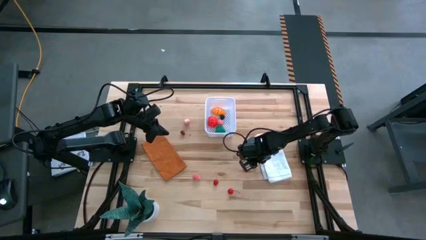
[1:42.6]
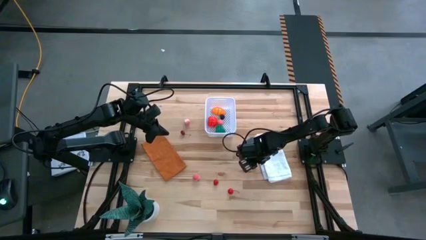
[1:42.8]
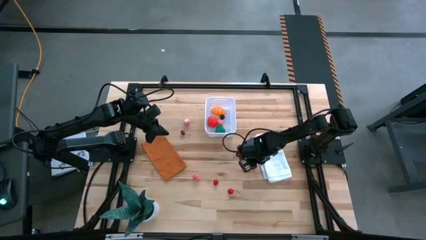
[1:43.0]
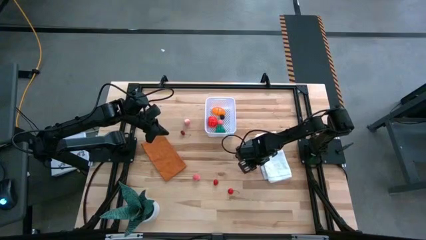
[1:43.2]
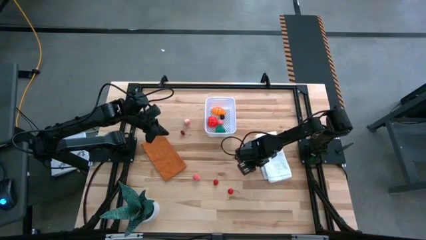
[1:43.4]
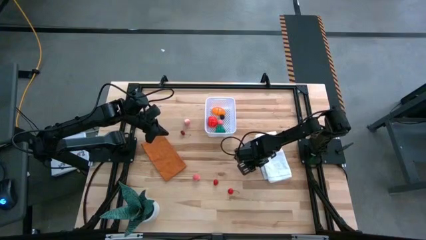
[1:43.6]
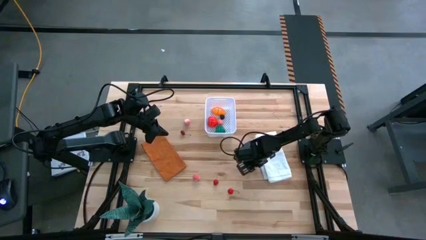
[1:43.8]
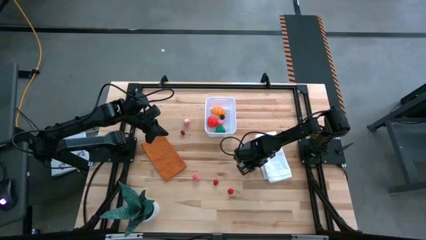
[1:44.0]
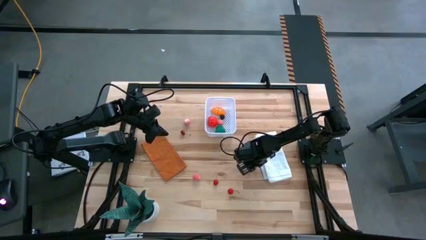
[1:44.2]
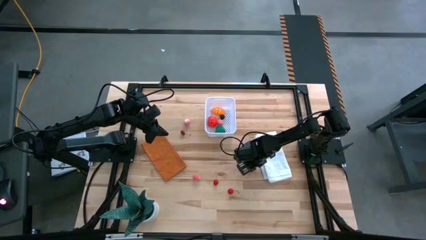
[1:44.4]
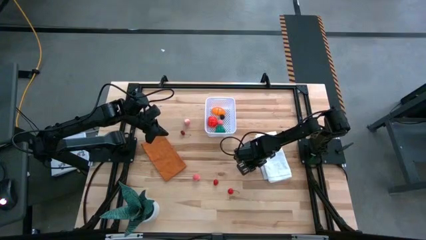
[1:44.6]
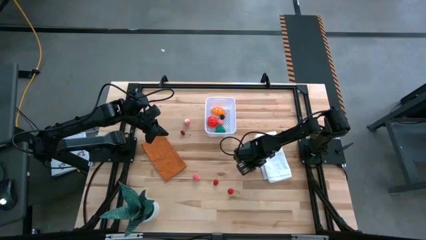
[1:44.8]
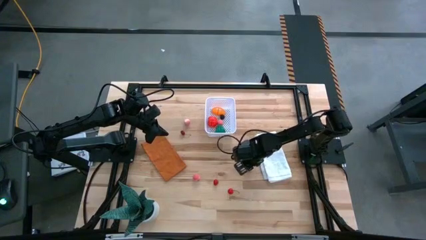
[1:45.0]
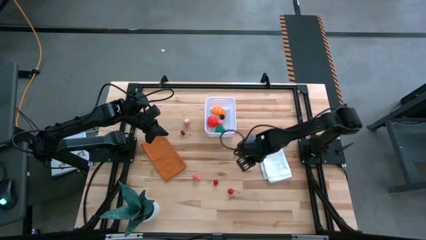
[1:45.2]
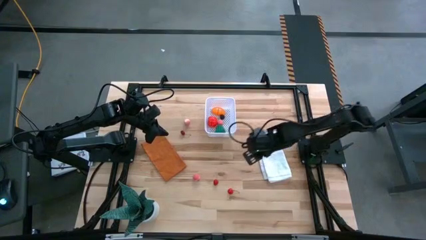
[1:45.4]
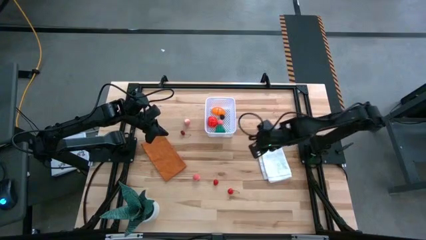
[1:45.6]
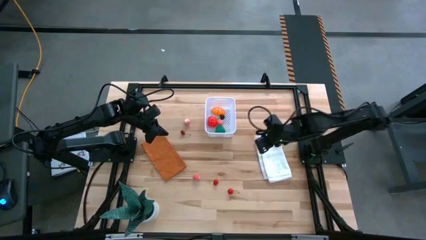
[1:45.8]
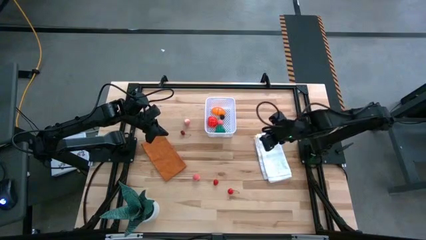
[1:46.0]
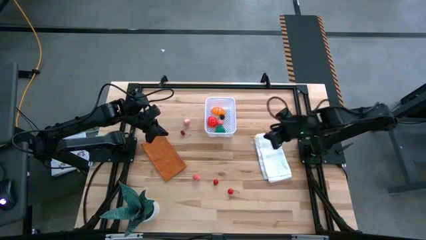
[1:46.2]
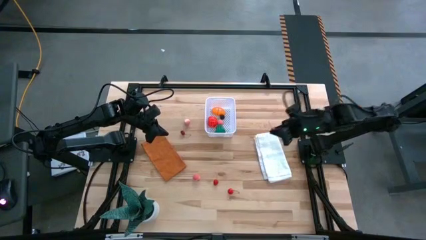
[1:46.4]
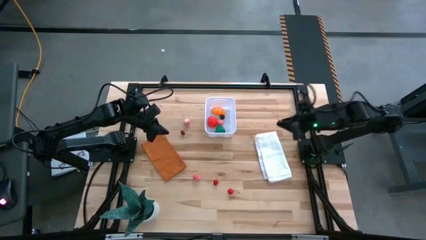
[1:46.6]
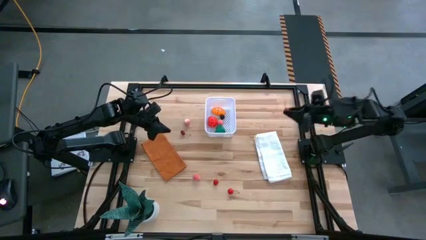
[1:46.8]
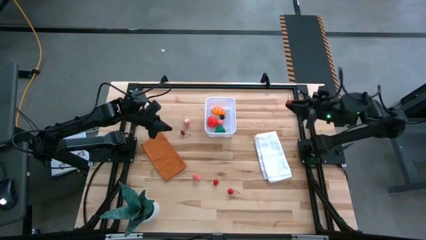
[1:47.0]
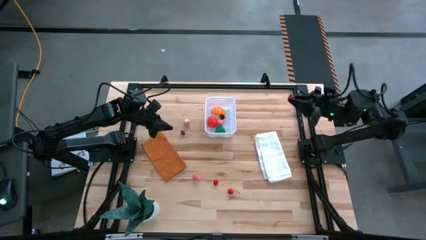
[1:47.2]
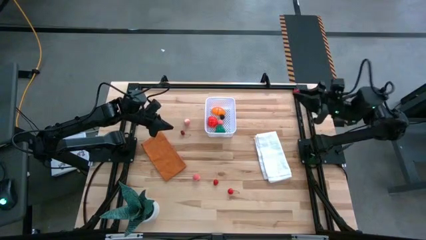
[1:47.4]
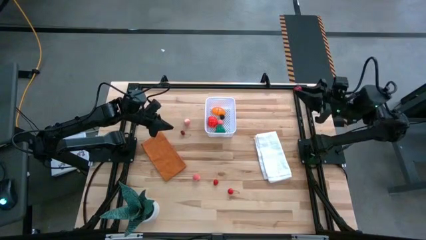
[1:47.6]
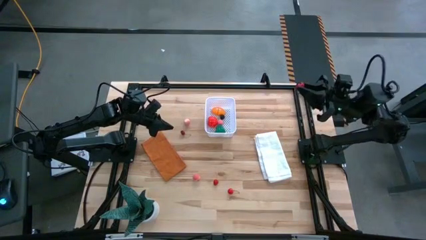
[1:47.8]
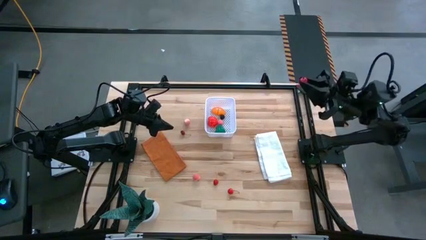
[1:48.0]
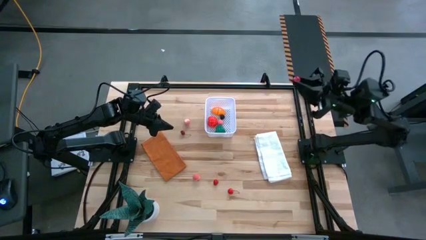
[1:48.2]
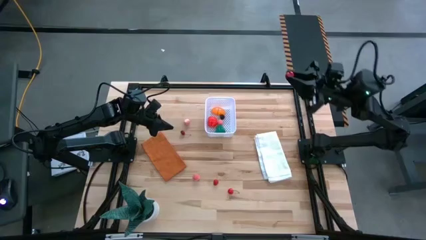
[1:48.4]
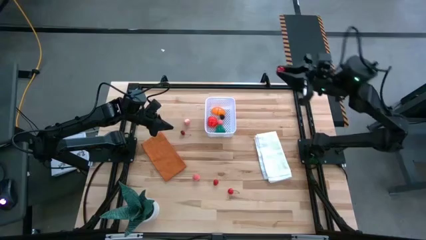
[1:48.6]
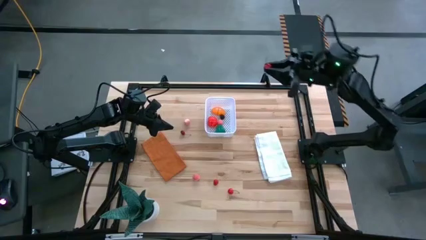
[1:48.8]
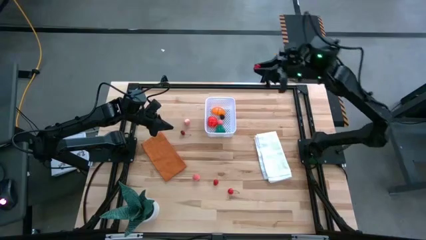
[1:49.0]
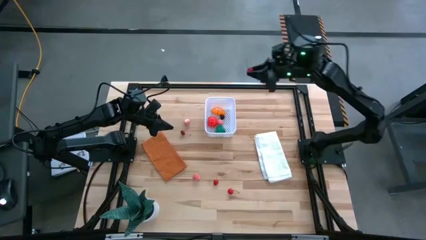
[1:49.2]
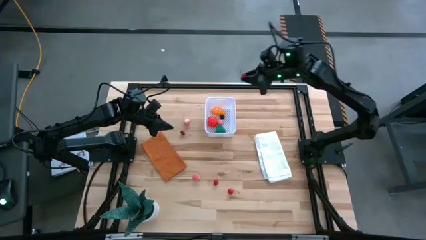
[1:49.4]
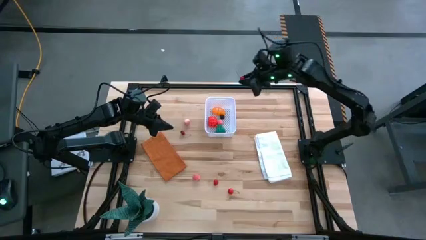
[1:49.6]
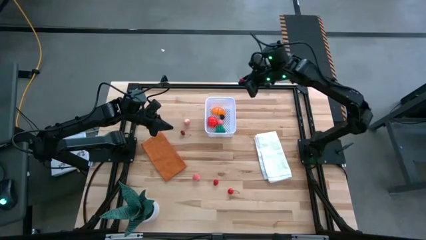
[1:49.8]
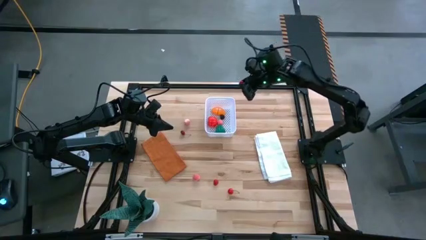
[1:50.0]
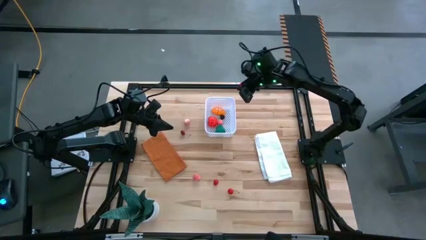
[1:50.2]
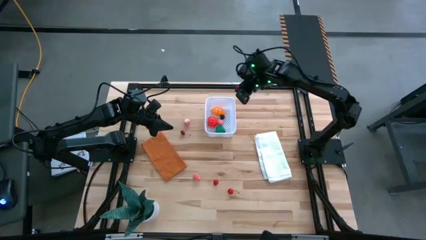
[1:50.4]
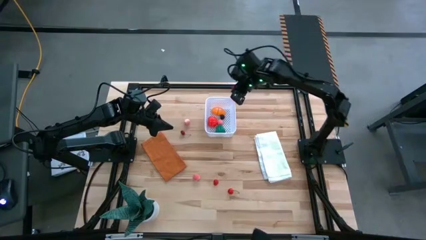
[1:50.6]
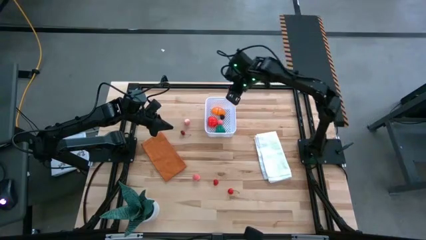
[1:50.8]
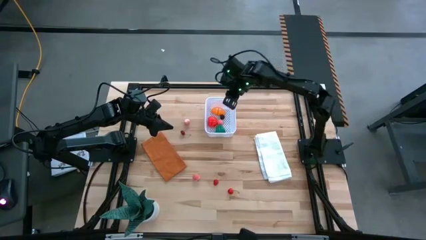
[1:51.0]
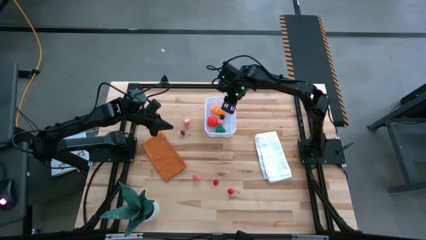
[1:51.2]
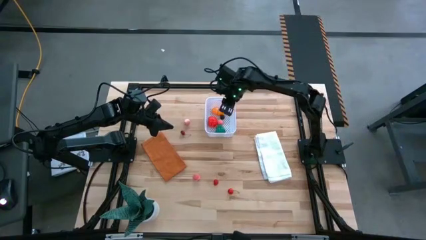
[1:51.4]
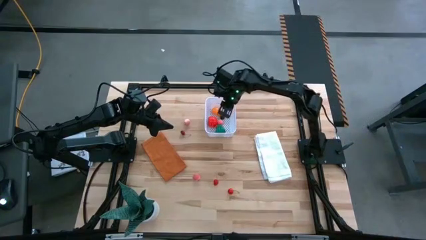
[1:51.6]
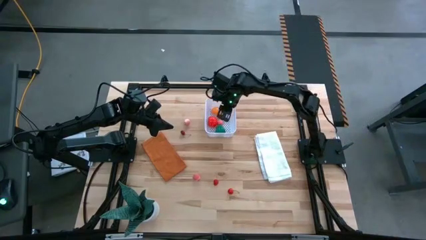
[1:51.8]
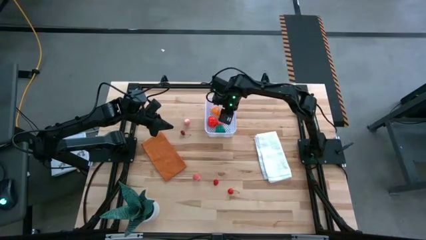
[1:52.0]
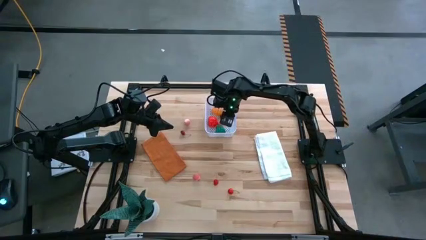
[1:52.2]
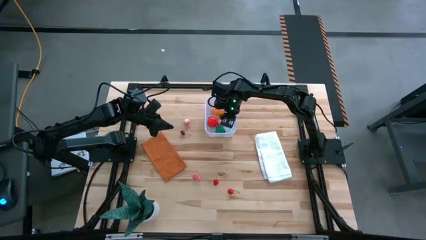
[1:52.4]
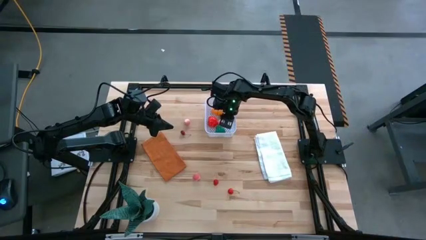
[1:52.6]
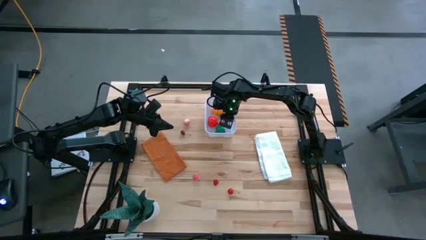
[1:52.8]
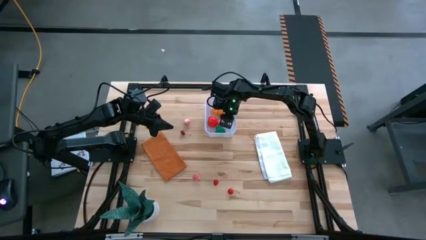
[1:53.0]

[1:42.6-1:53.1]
Task: Pick and placing Produce into tupperware
Put the red cherry into the white bin

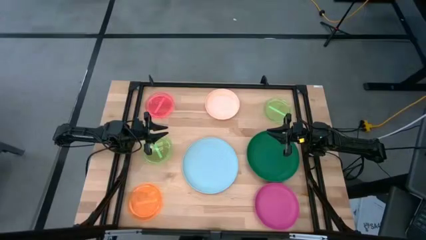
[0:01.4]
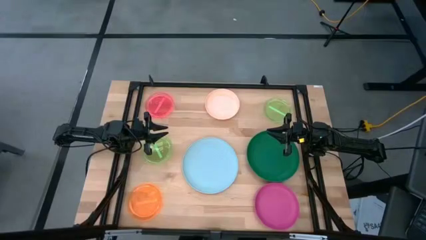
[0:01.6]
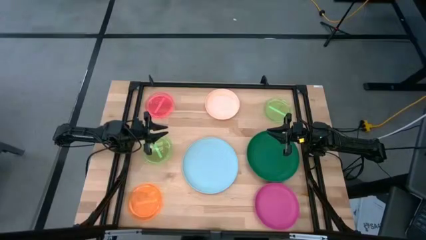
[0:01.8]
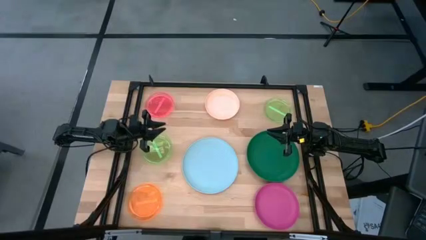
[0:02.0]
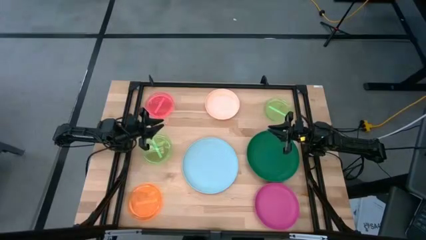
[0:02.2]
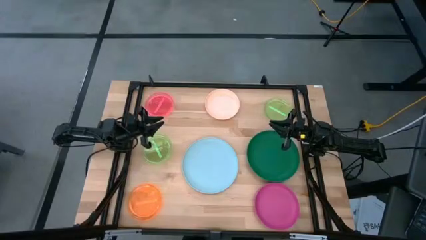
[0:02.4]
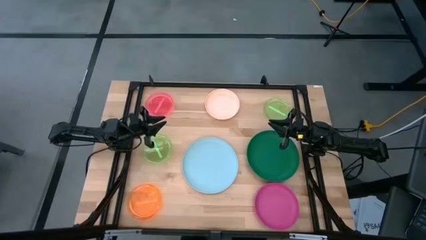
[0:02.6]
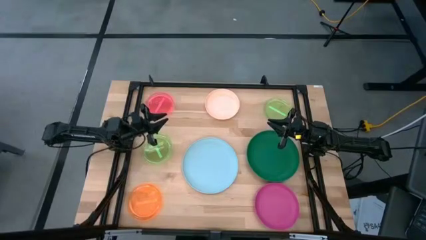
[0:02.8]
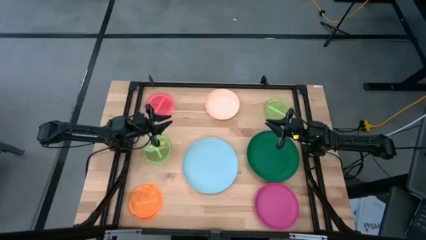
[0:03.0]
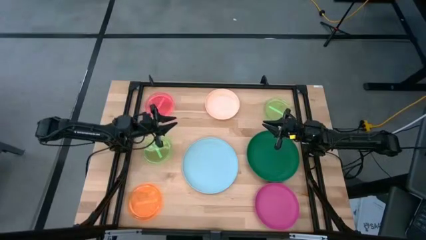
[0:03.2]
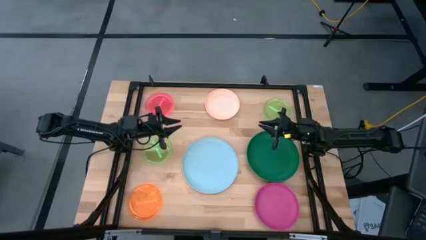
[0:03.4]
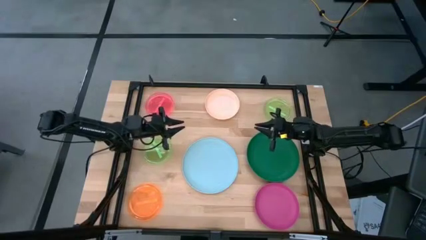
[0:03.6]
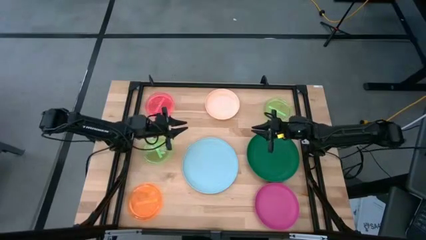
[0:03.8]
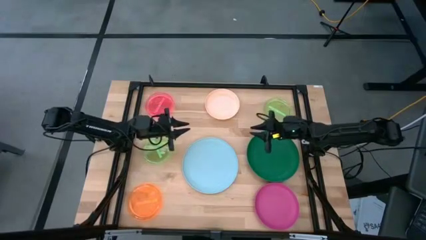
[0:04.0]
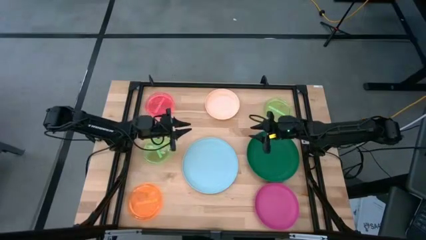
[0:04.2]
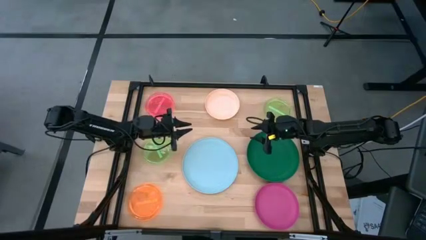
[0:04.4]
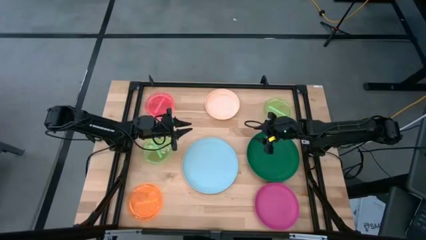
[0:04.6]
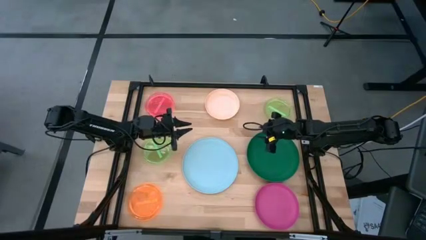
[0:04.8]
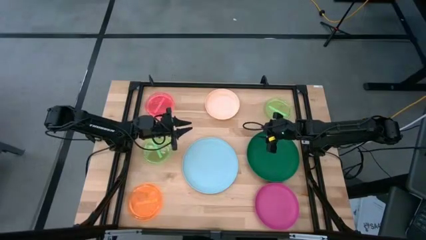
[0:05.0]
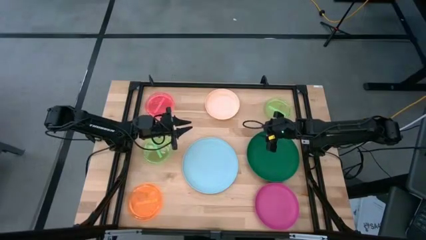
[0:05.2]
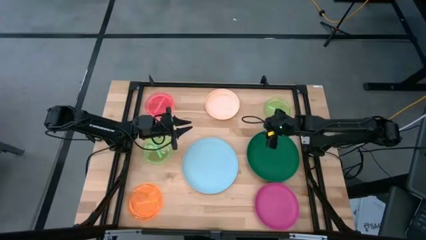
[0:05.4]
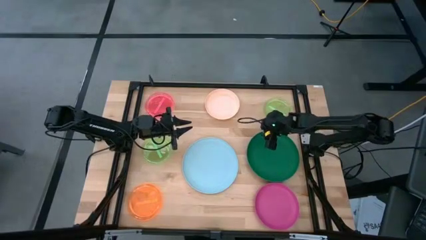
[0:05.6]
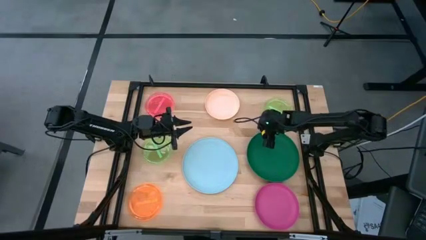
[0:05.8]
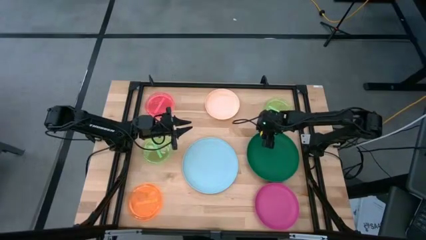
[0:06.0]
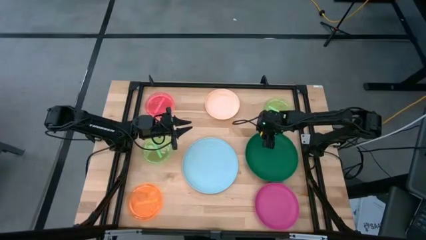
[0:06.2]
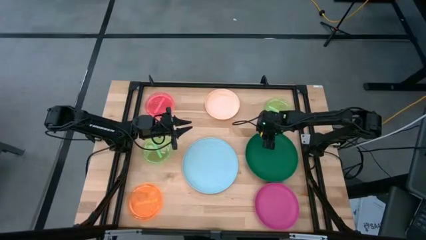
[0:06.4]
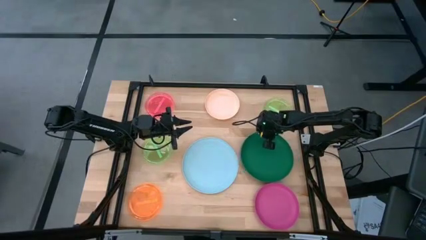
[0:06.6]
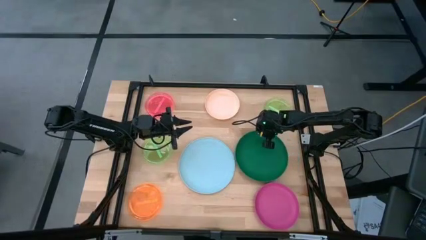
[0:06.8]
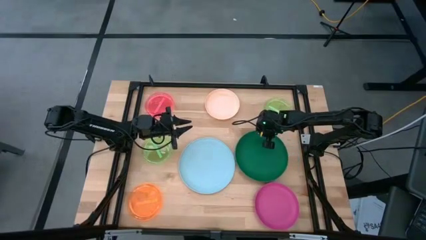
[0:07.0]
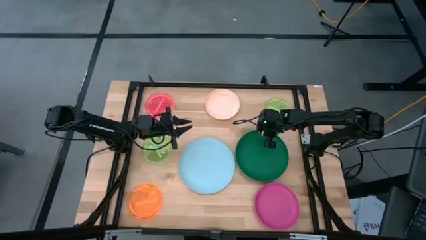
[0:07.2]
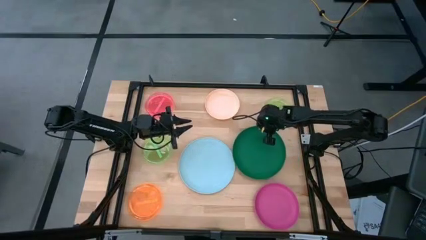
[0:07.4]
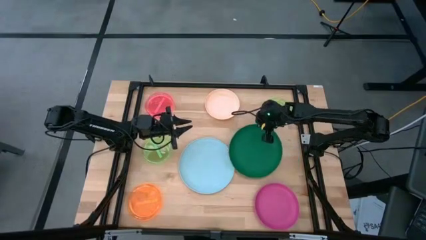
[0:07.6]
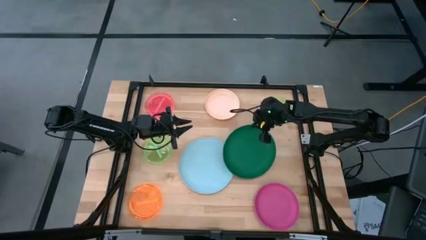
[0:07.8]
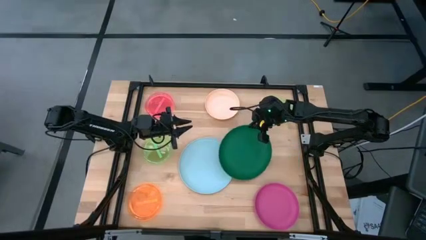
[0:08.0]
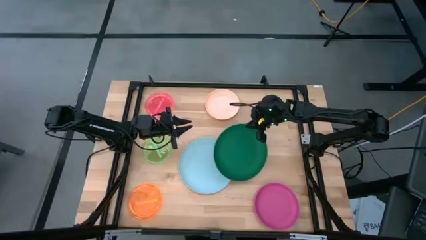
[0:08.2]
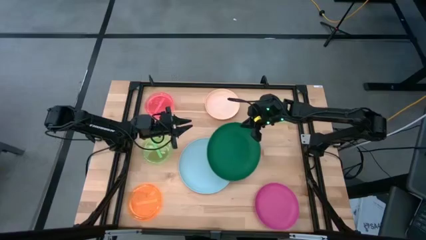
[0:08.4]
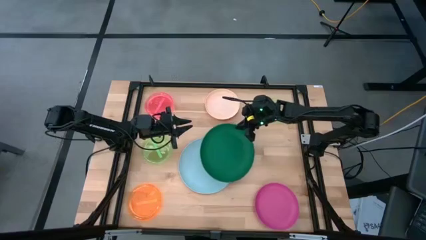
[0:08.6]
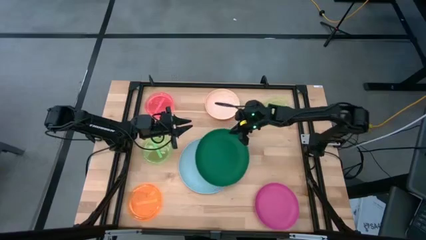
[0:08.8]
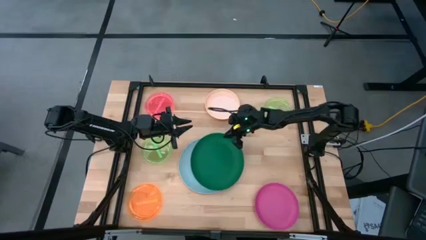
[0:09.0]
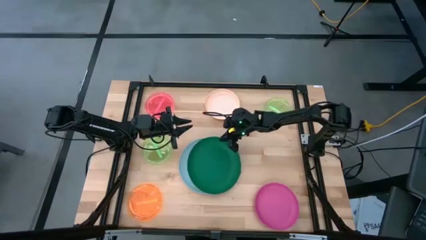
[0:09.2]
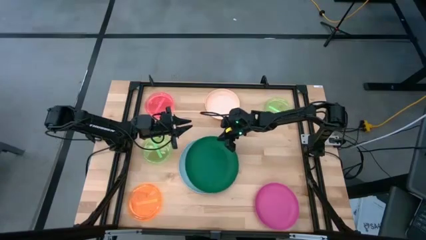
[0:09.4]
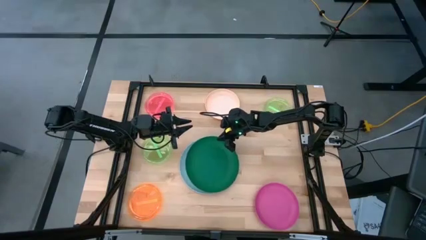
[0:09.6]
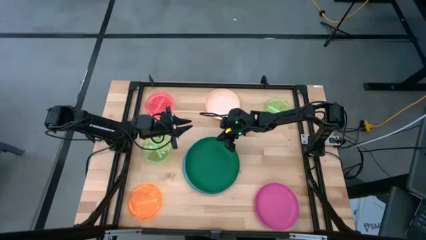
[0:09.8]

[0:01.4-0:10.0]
Task: Stack plastic plates
Stack the green plate on top of the blue plate
